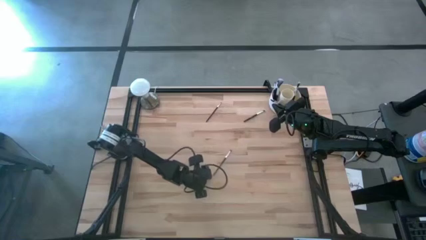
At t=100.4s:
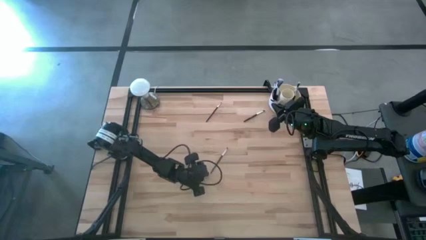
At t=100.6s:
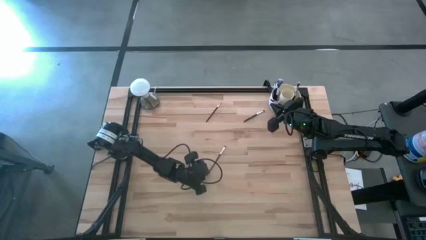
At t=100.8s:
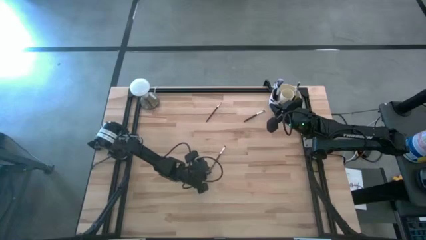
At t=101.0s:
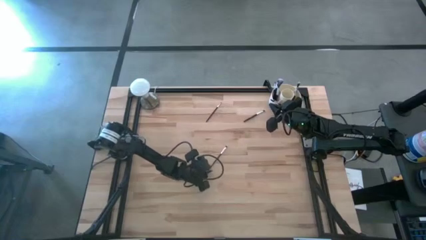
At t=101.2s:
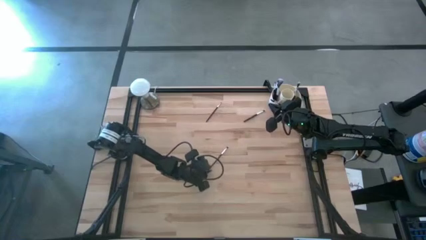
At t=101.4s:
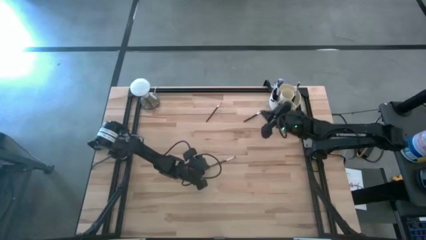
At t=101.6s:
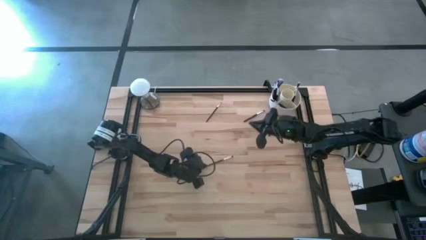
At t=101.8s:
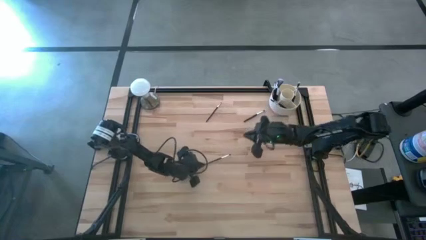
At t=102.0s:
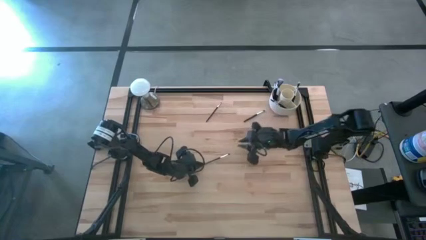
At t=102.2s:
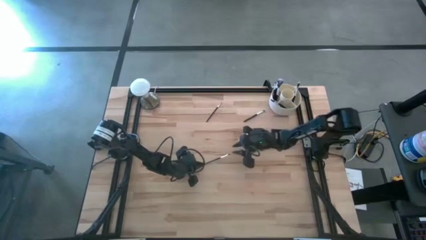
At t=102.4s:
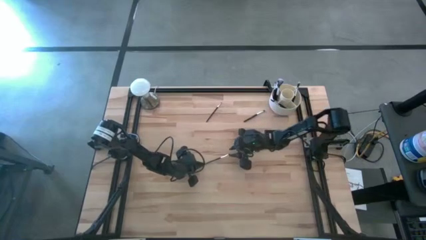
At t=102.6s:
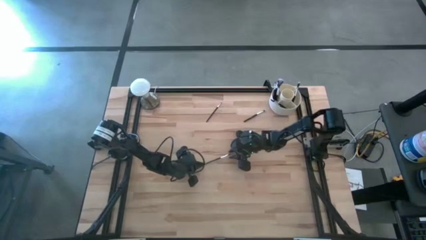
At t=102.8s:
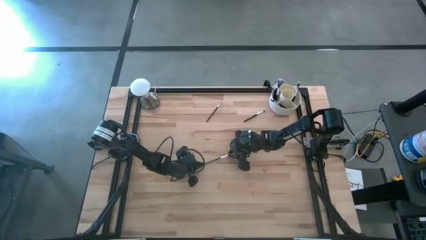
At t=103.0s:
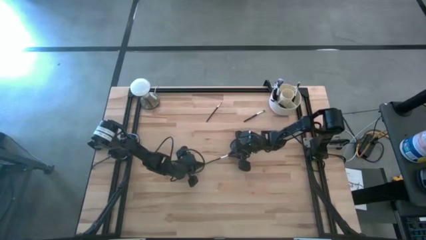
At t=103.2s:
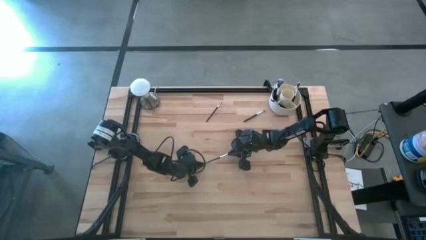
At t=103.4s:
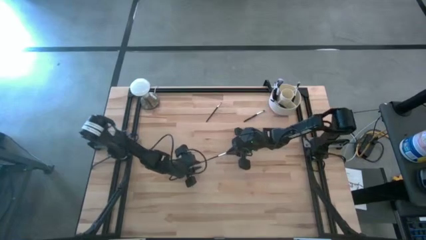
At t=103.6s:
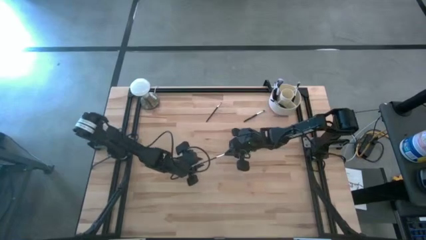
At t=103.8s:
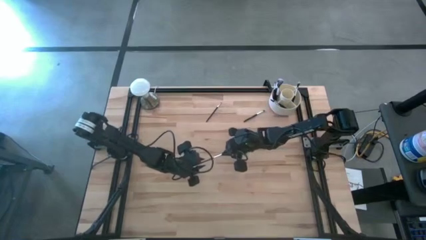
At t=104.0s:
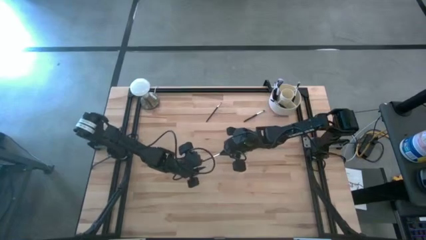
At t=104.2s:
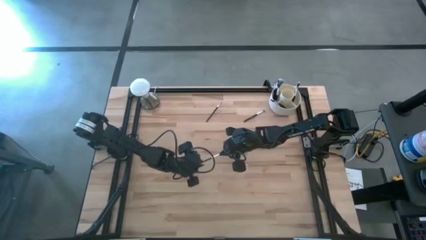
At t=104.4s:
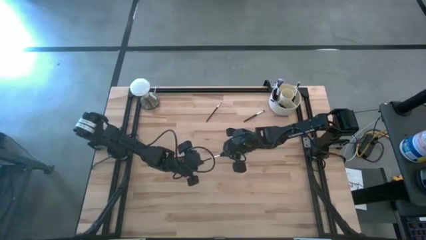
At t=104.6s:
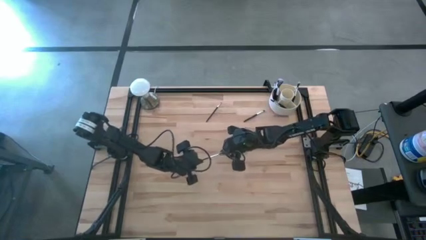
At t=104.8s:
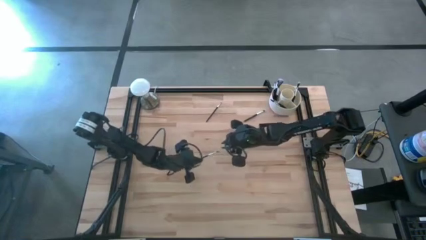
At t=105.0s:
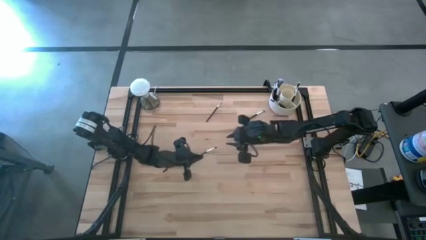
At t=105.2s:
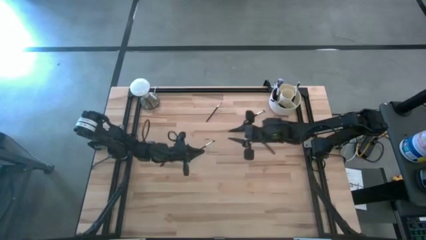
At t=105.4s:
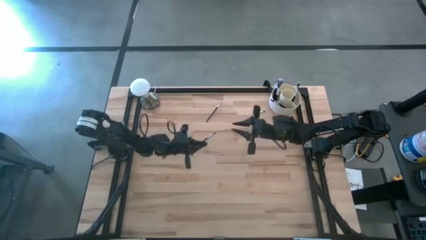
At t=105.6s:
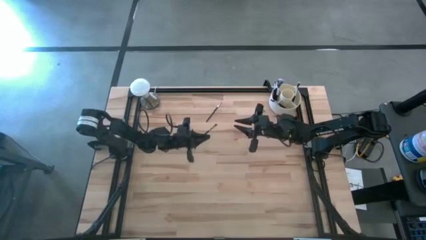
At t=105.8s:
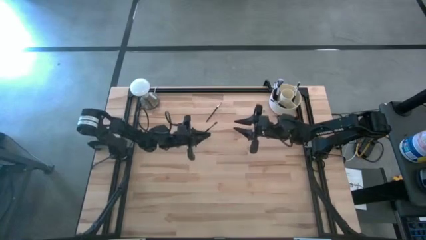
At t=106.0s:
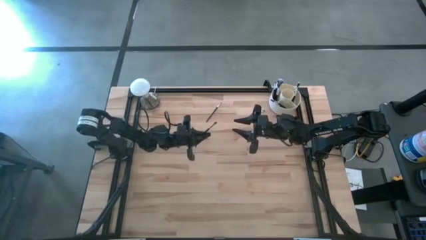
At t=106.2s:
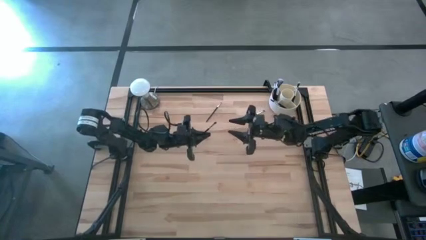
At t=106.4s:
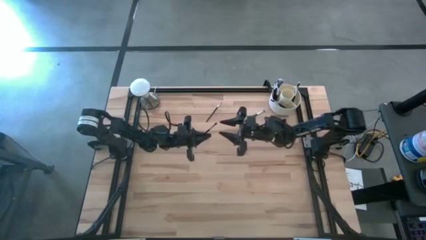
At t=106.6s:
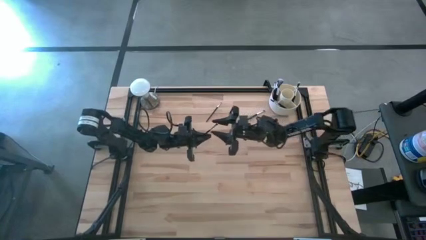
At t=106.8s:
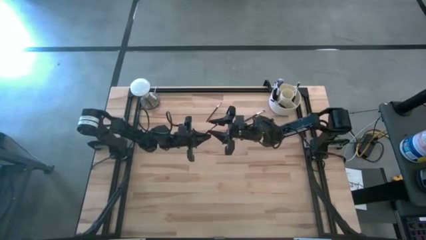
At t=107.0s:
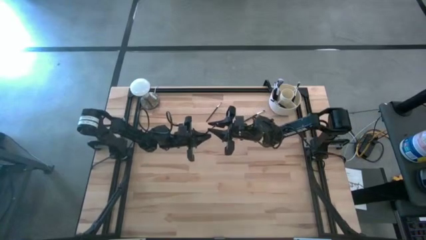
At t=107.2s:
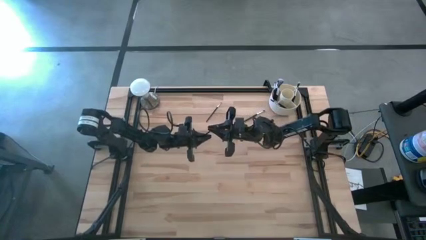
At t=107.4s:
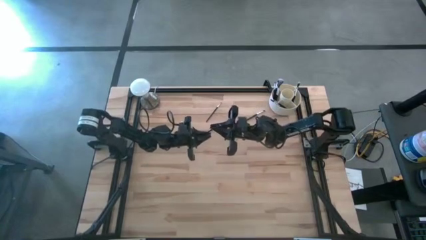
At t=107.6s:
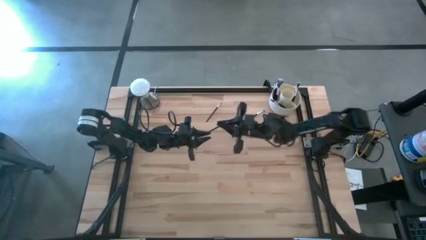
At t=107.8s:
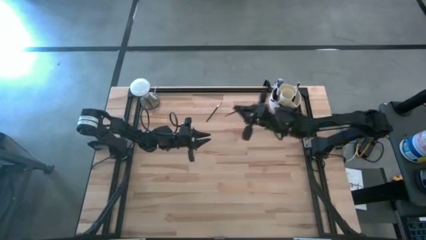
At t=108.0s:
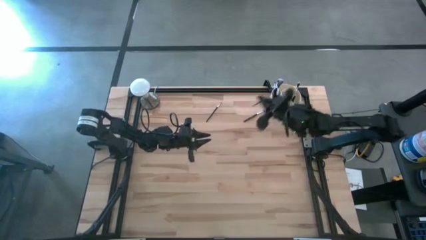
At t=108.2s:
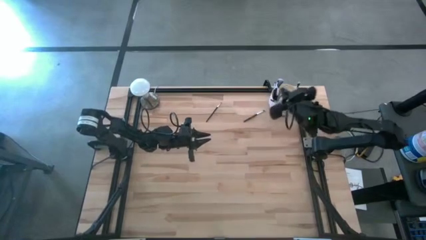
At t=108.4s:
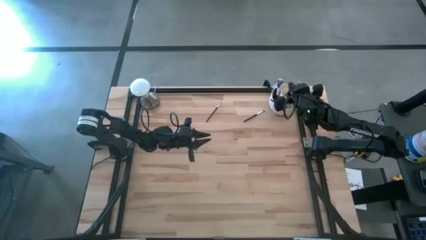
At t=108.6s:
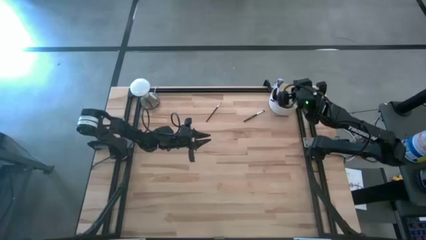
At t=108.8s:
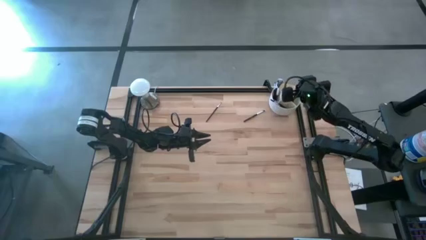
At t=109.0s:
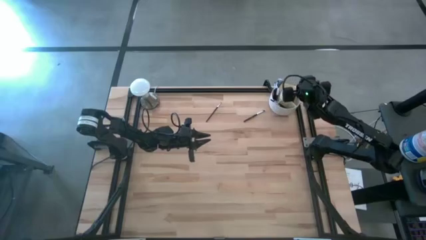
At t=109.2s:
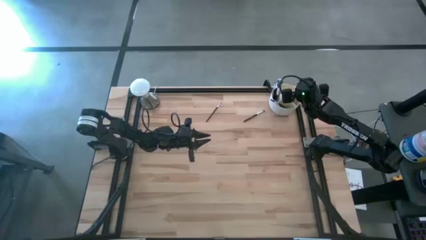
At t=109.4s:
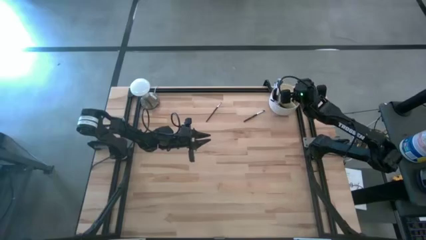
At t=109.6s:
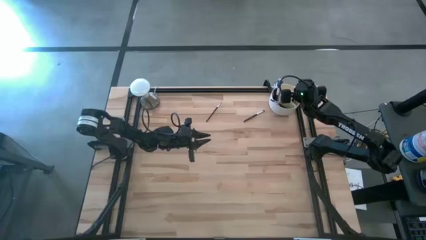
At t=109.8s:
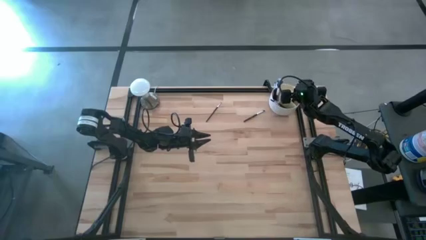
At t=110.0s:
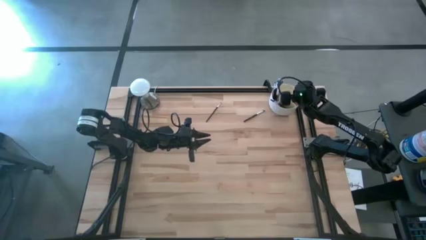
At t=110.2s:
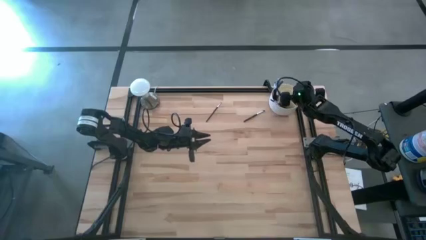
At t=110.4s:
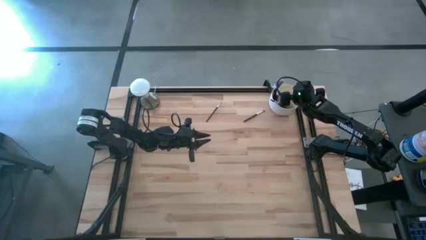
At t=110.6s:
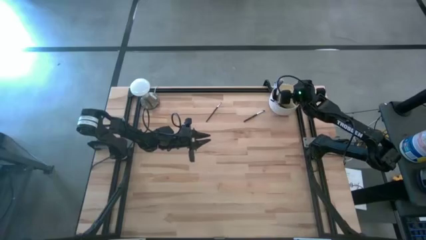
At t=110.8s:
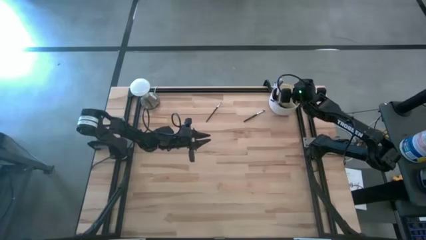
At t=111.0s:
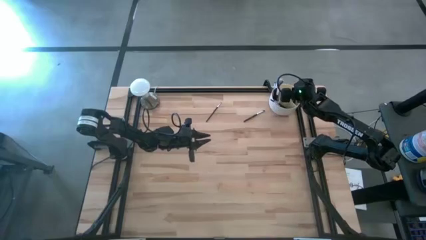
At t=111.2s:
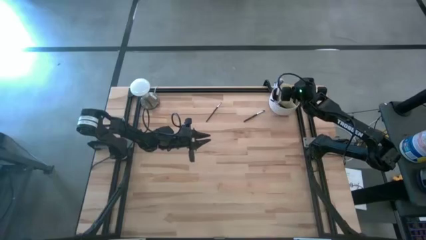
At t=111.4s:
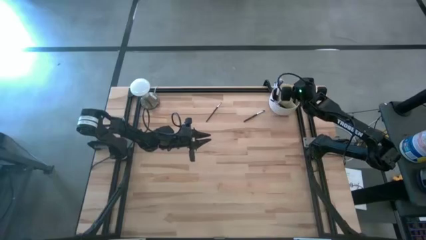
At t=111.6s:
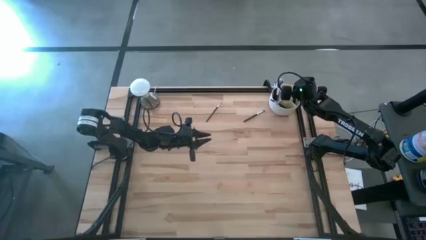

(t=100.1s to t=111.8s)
Task: Put items in baskets/containers
Put the black eyeshadow brush into the white organizer

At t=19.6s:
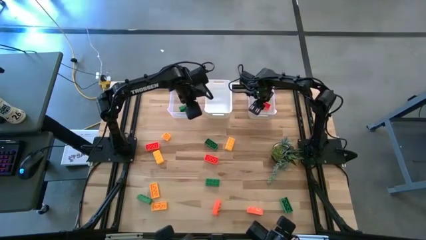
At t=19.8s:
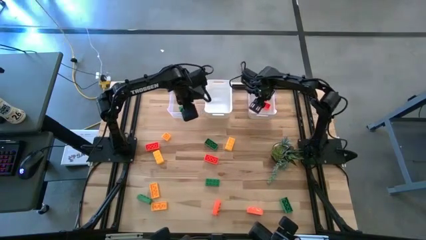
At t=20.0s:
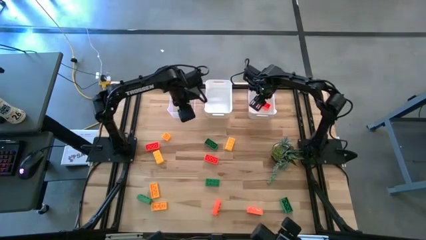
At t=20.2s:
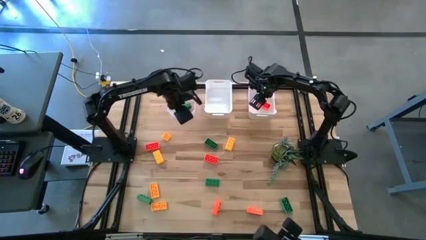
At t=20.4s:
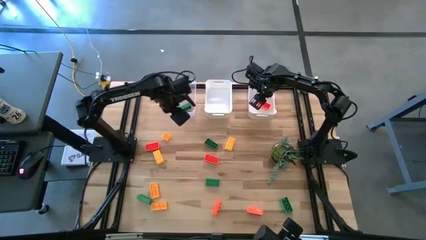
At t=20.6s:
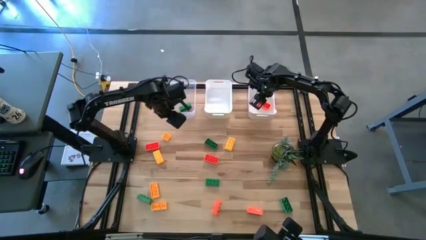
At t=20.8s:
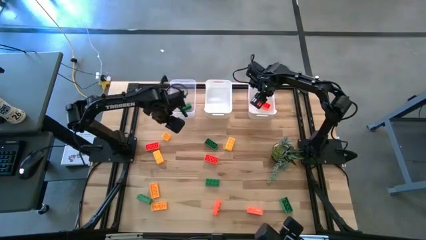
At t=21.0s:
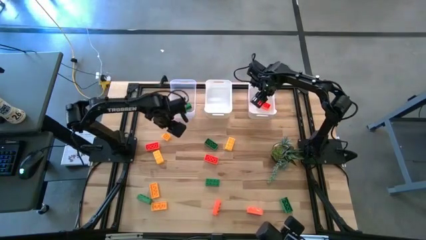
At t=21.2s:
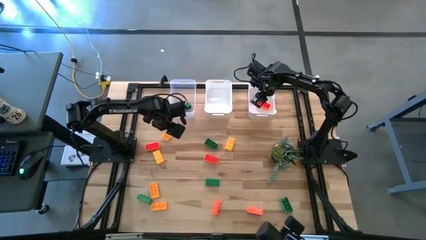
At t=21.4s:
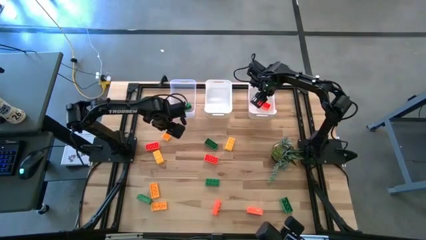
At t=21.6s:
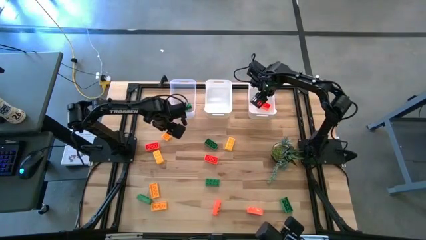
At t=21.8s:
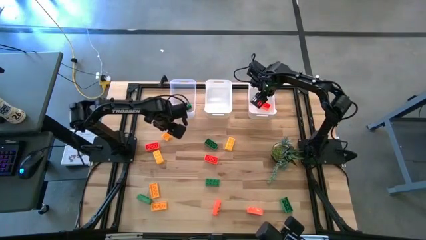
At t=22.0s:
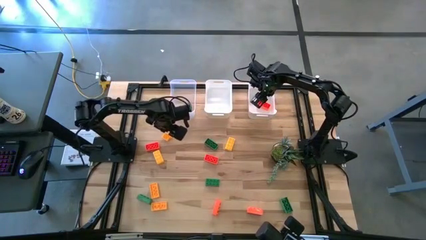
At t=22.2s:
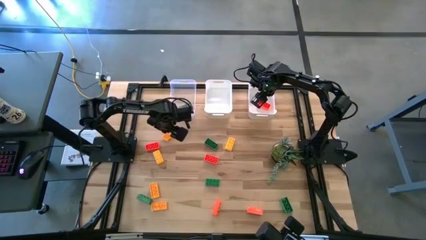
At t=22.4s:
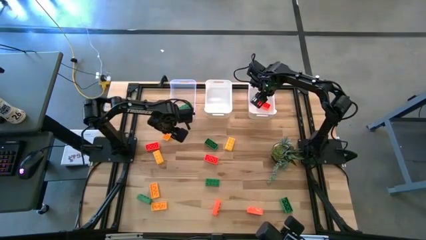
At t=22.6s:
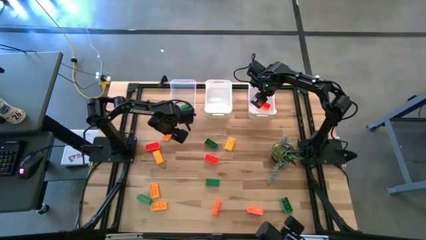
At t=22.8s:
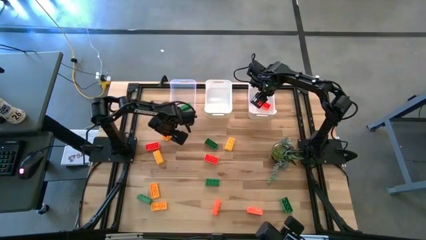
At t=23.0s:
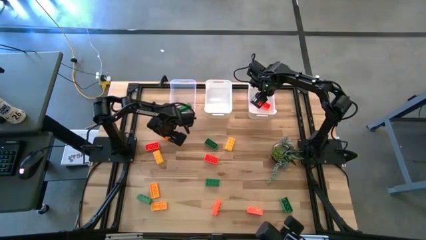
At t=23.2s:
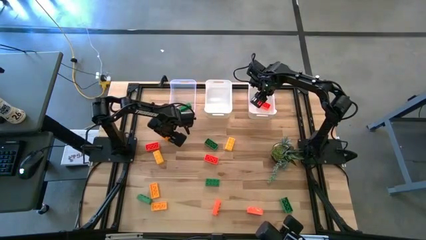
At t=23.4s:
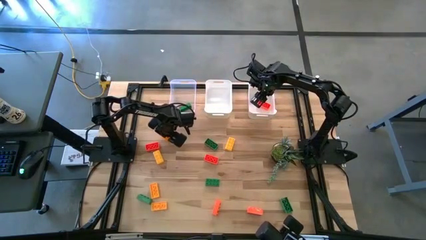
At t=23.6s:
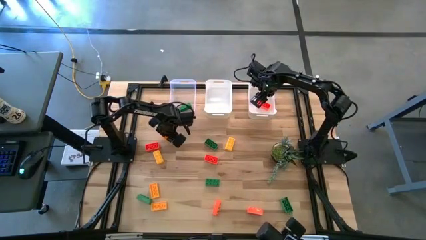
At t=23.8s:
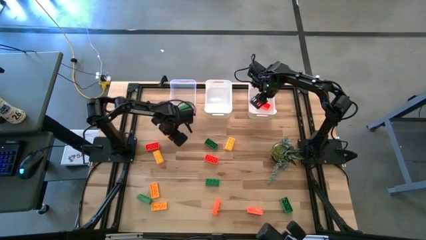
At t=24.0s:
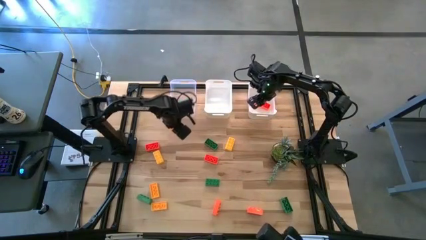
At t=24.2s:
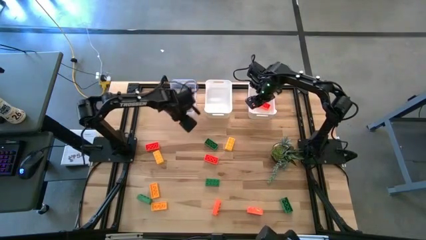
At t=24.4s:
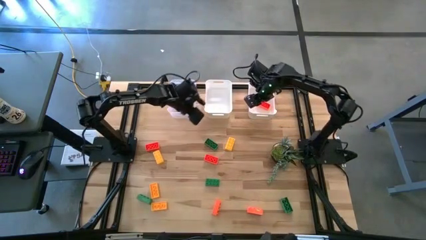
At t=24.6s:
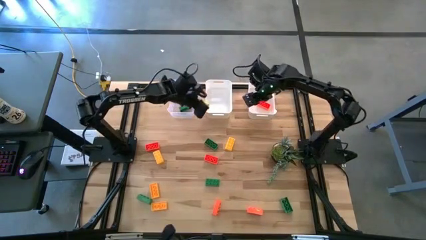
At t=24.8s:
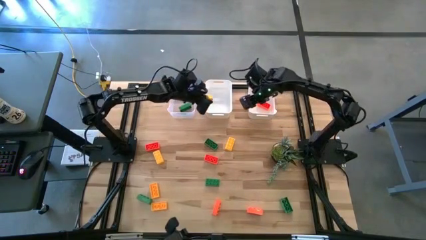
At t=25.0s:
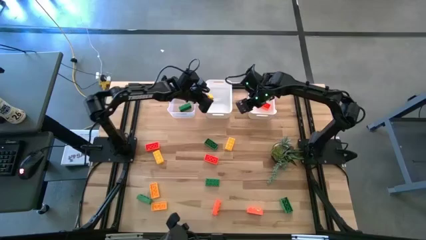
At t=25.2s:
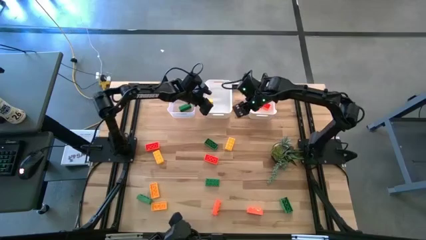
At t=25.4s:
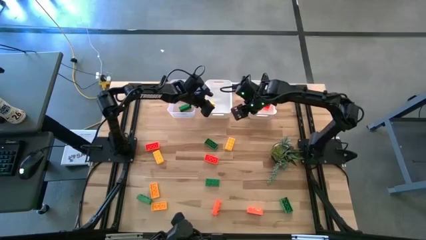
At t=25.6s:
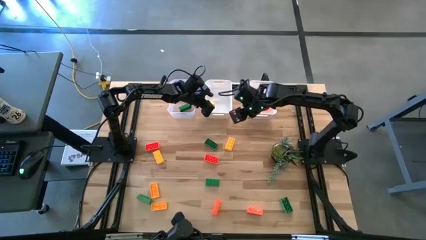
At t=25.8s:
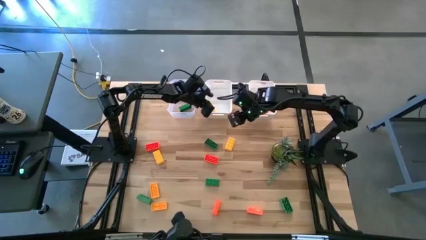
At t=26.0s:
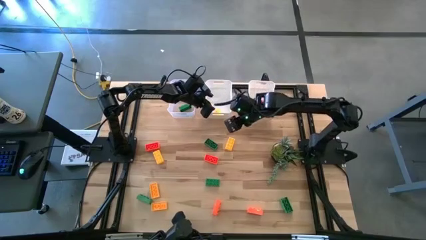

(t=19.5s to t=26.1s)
Task: Sort & place blocks by color
Put the yellow game piece into the left white bin
